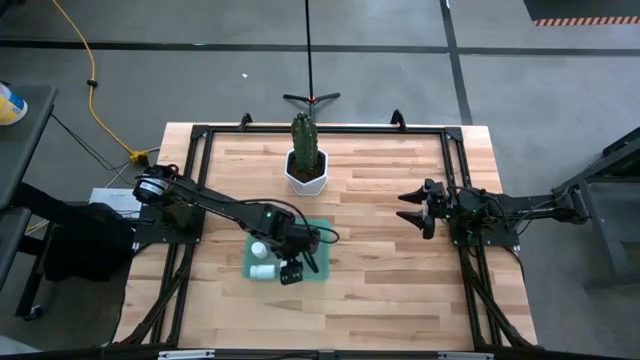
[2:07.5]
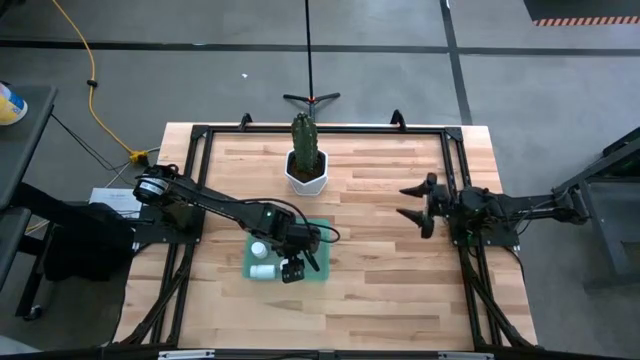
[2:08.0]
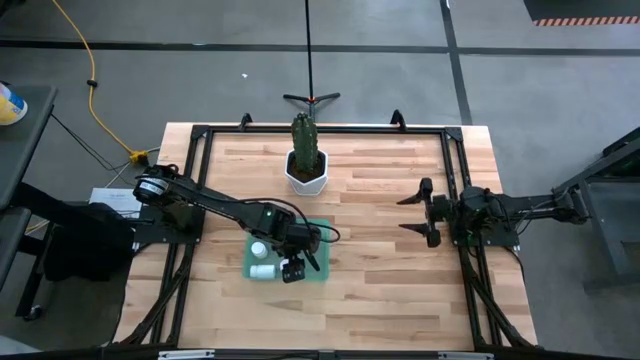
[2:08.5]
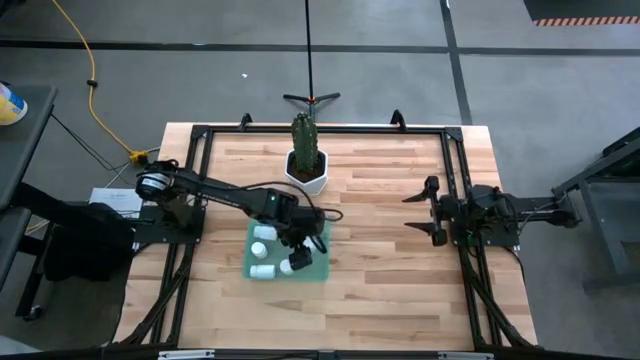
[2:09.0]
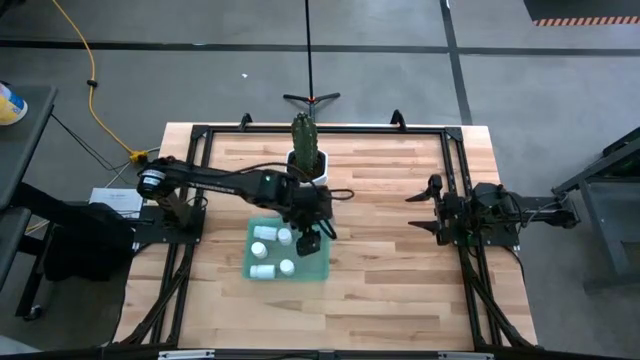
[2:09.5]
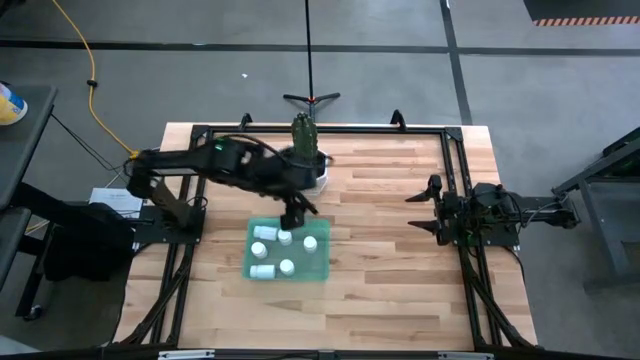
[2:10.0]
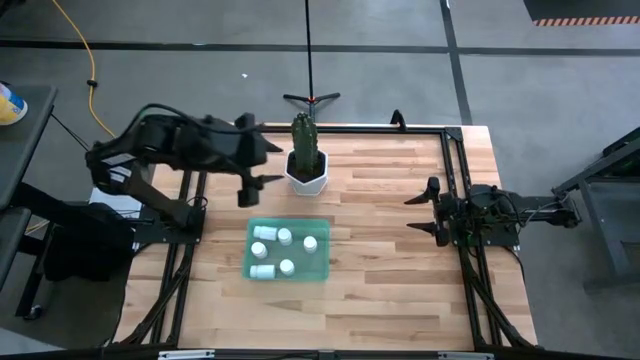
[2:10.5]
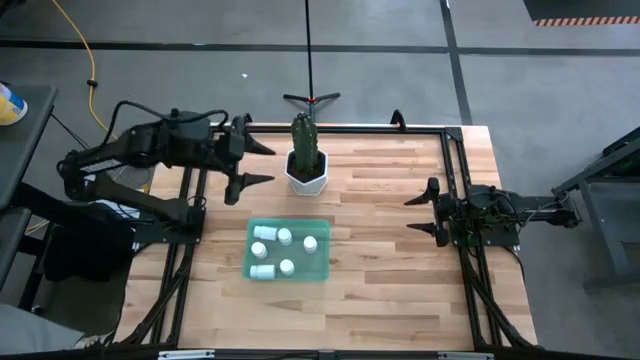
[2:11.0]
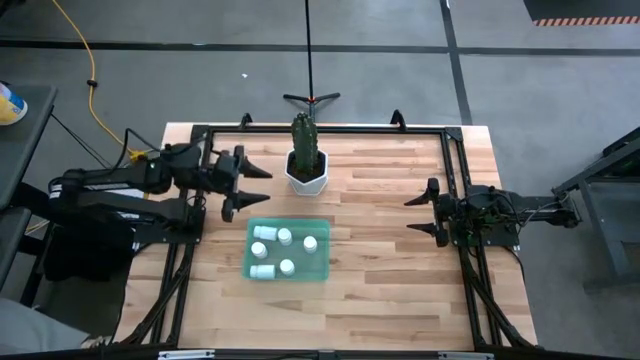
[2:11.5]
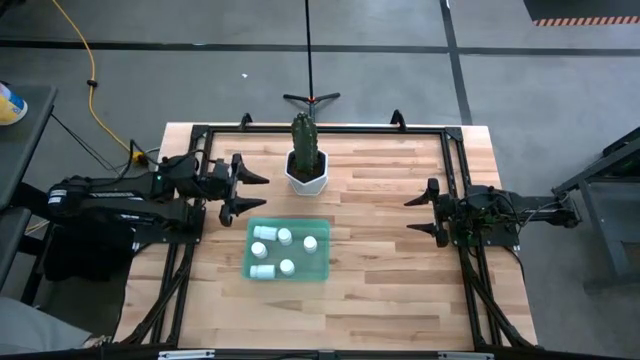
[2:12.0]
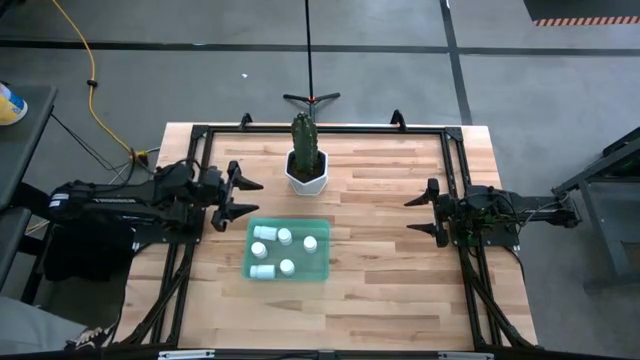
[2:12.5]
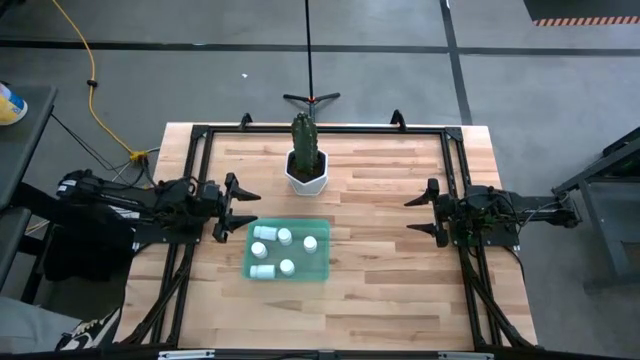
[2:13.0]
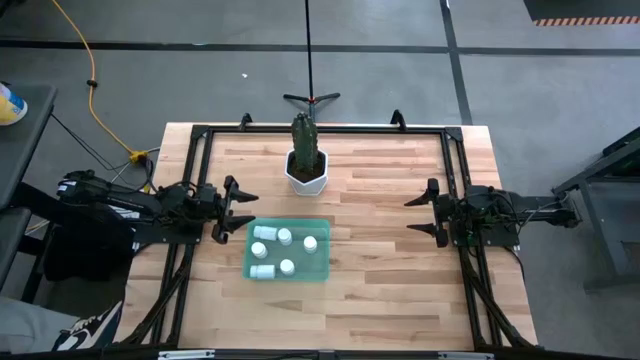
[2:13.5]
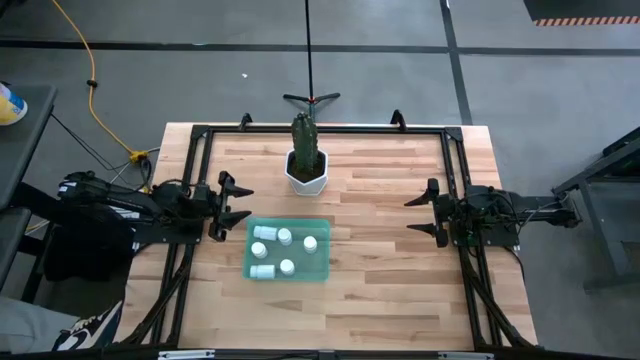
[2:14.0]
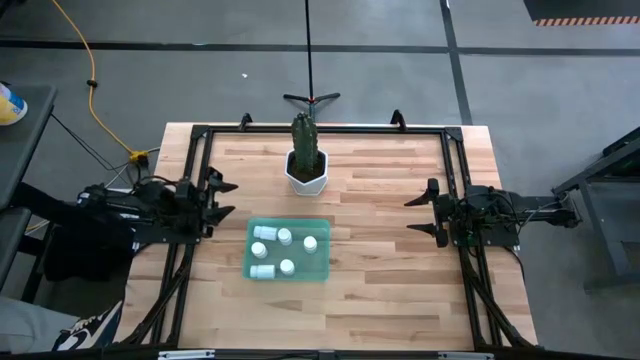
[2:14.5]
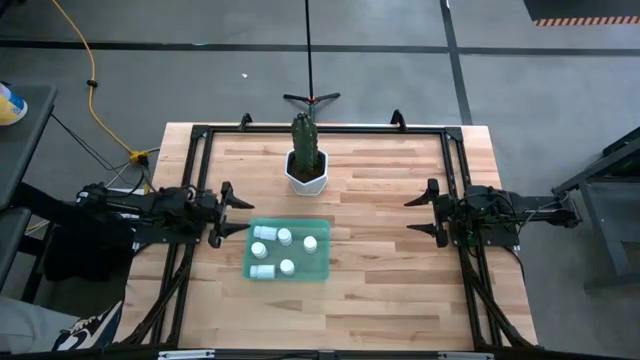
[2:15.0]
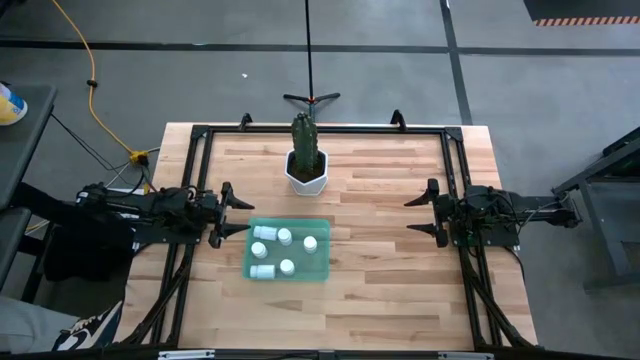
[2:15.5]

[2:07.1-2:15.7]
Task: Pick and place pill bottles into a basket
Return to Home Position

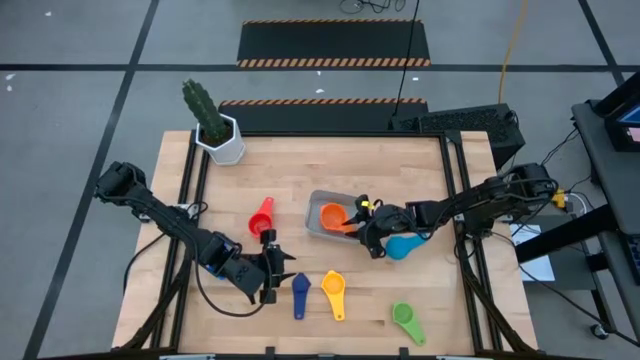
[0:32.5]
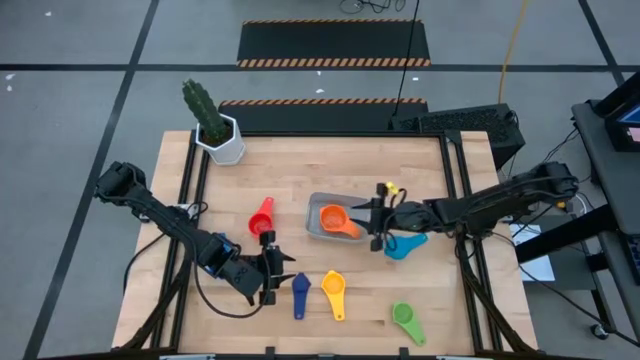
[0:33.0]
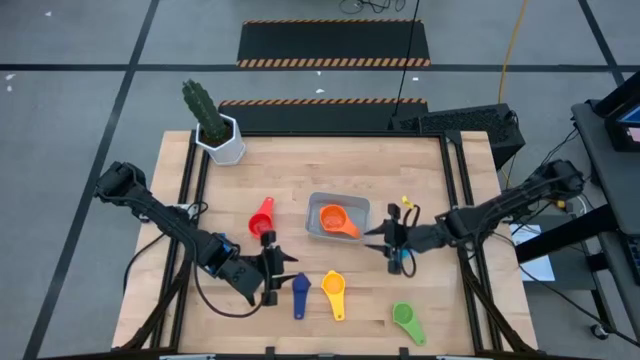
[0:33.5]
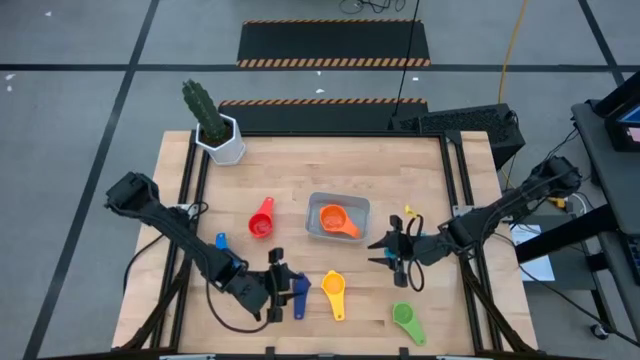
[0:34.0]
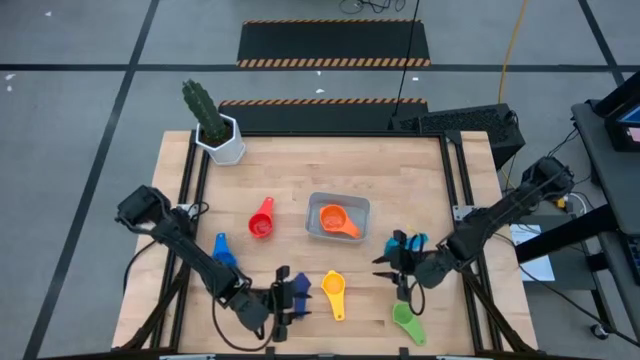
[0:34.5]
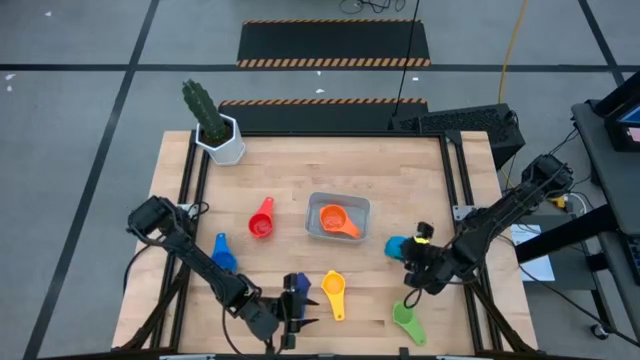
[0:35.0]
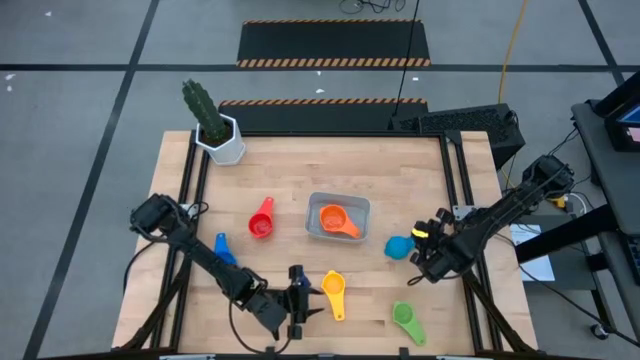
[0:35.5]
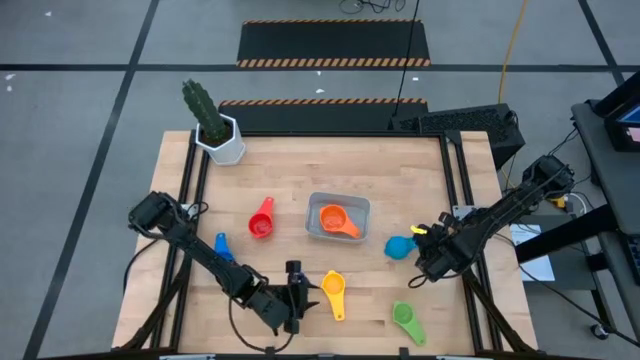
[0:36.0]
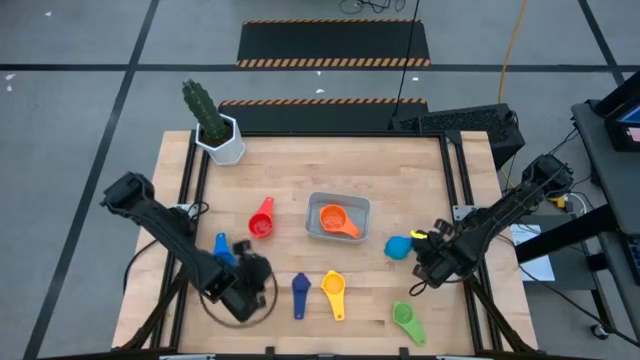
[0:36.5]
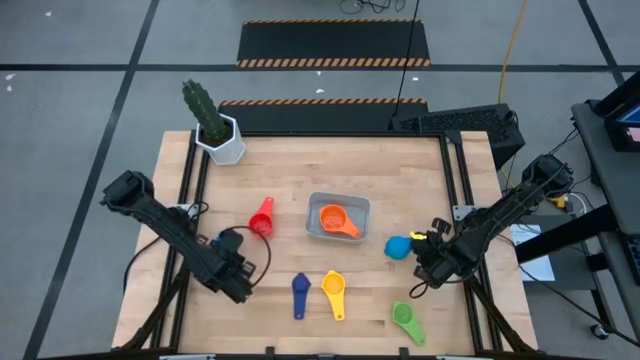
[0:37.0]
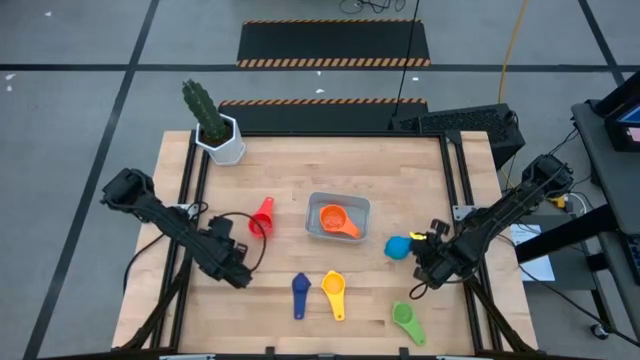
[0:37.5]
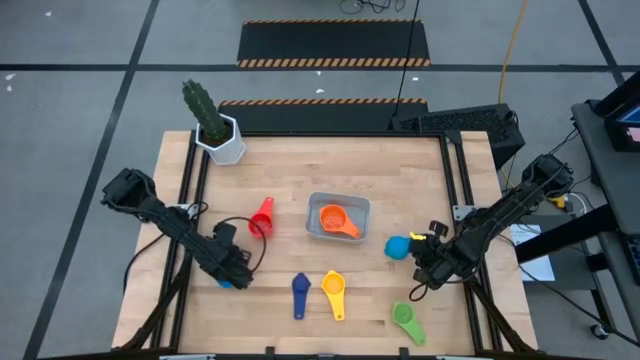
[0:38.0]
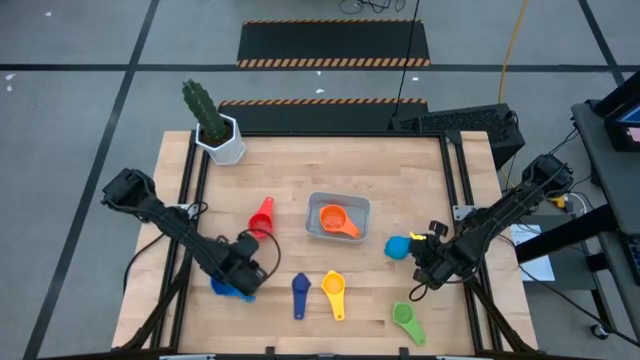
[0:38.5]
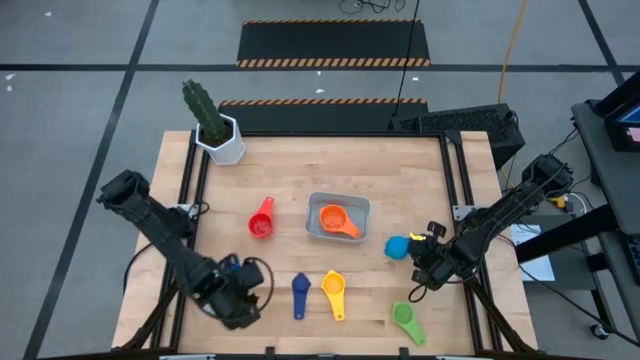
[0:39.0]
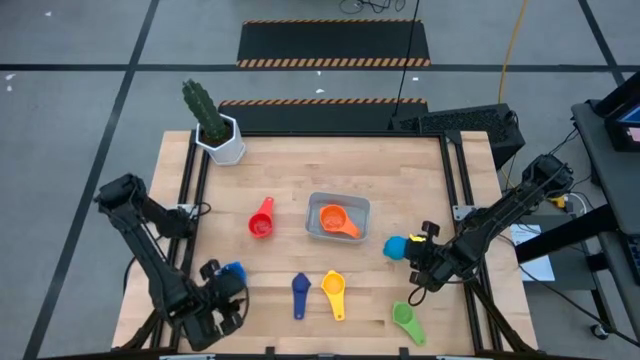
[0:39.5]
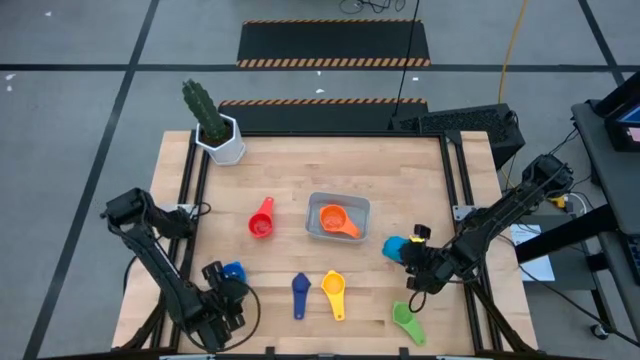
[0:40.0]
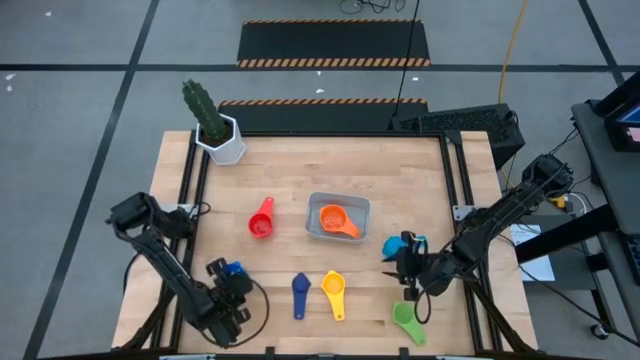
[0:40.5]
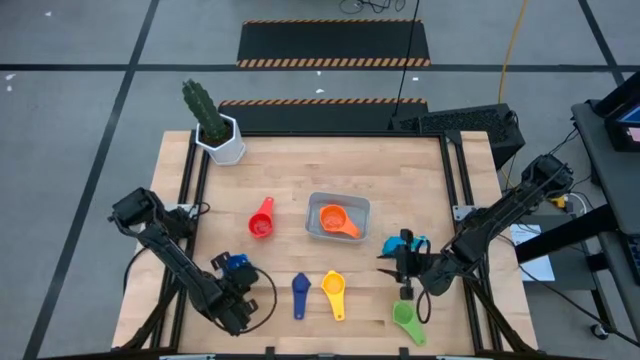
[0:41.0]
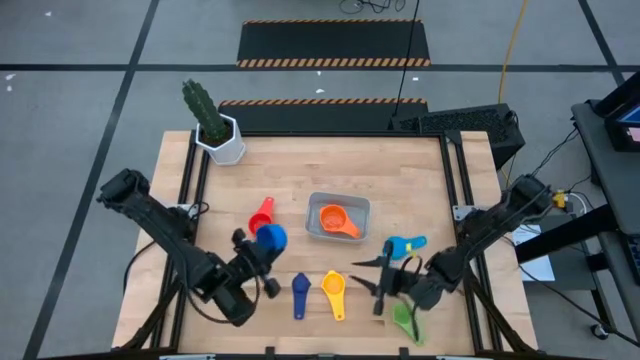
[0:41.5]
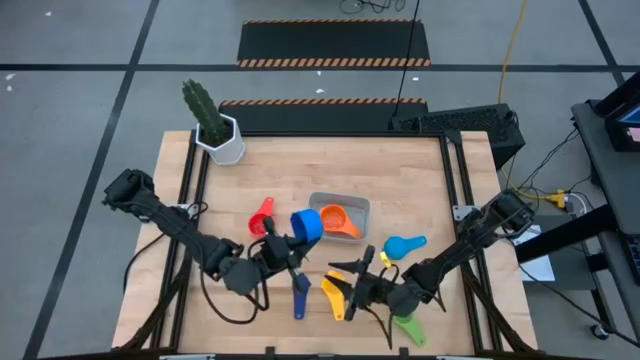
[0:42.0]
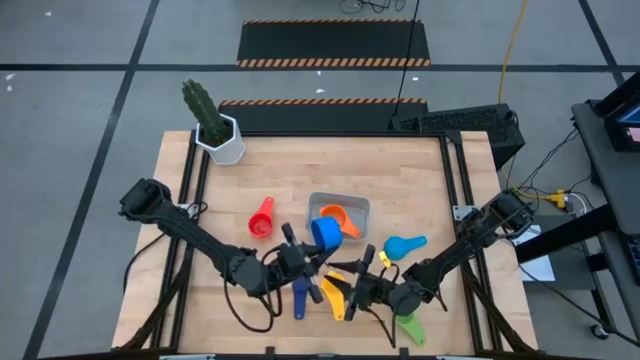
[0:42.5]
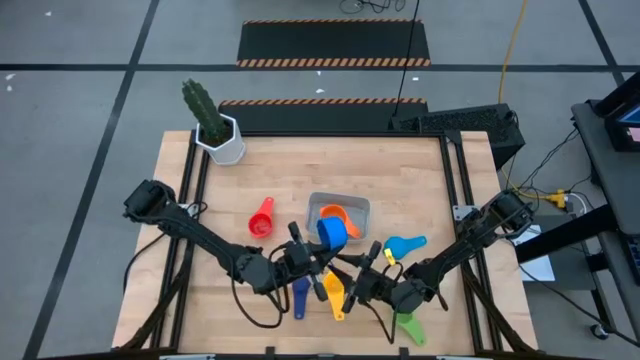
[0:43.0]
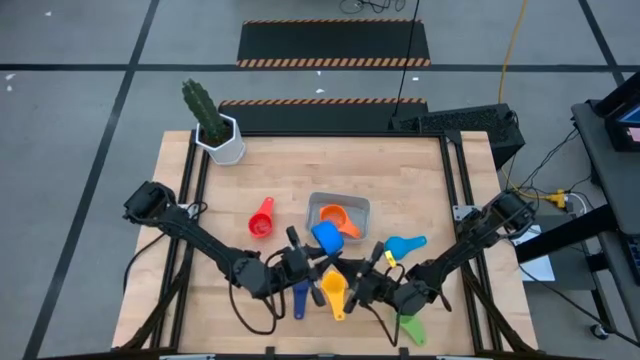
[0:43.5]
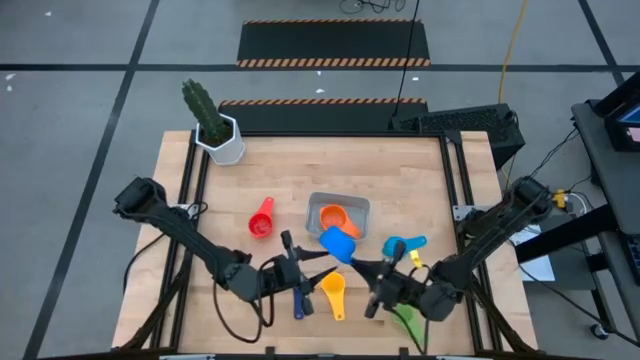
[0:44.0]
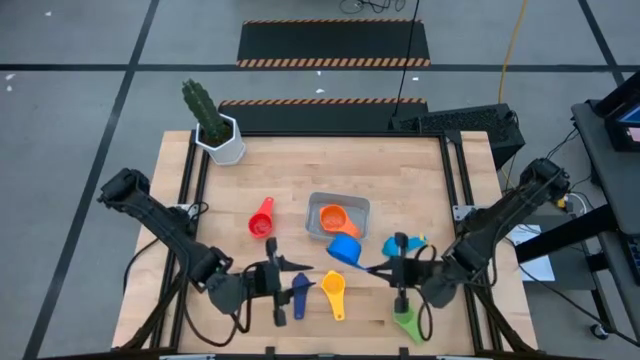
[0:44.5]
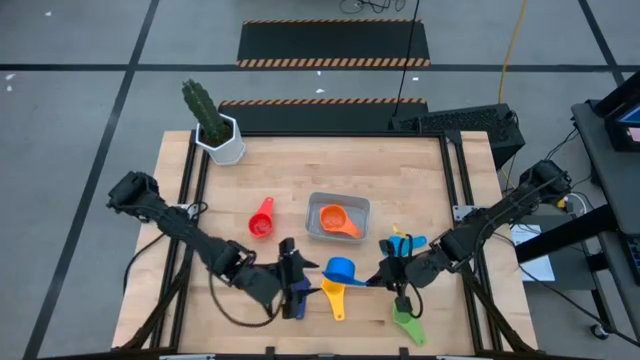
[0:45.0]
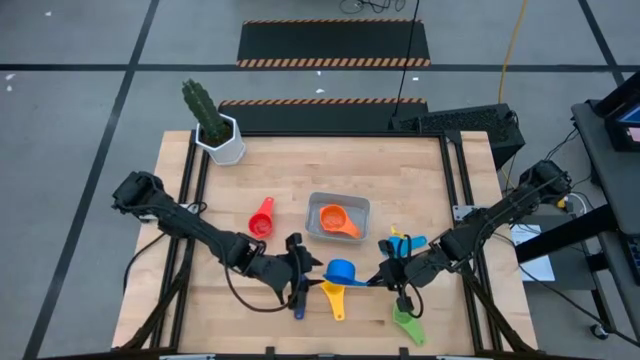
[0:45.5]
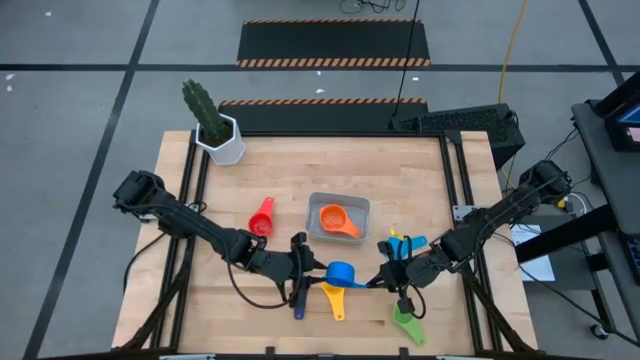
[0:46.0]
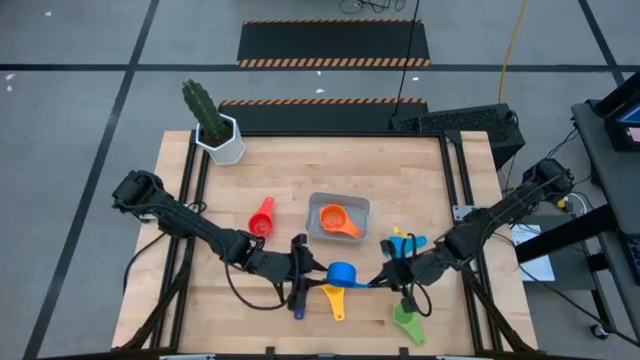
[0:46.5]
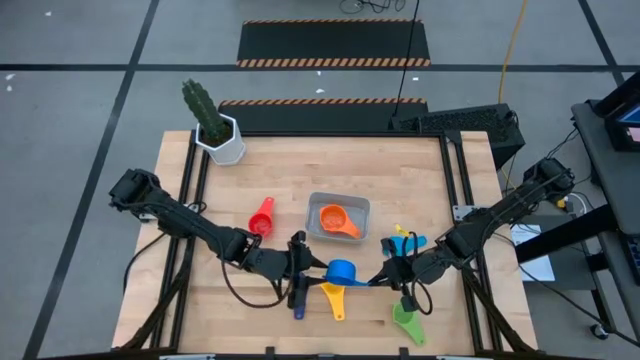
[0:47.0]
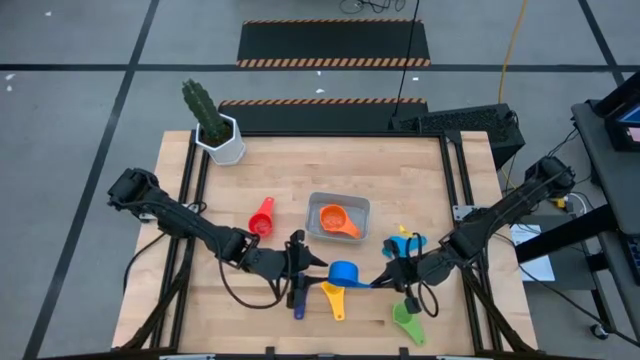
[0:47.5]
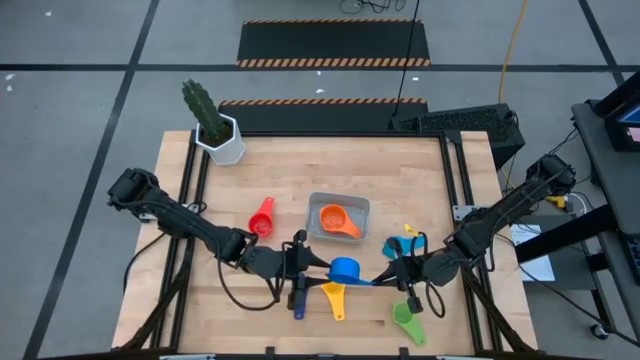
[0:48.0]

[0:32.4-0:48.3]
Task: Nest measuring cups in basket
Stack the blue measuring cup into the orange measuring cup
